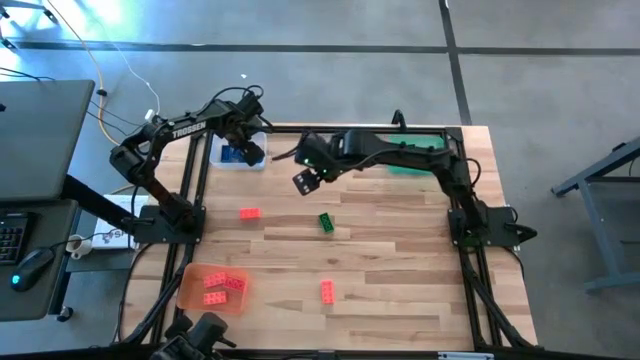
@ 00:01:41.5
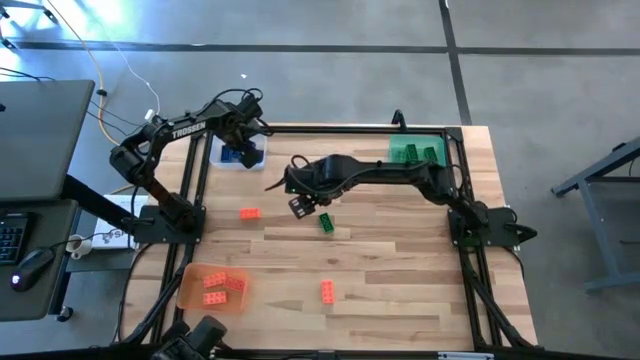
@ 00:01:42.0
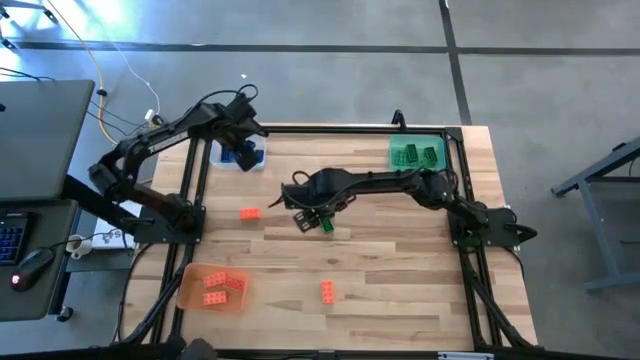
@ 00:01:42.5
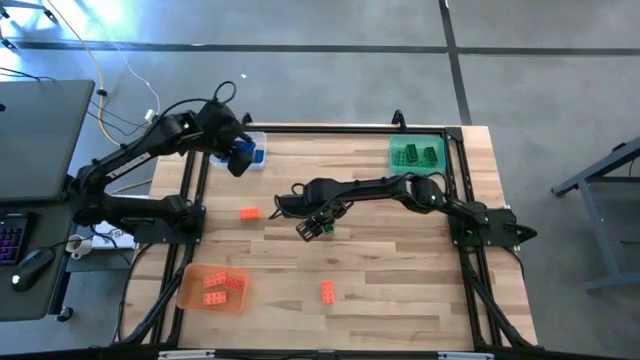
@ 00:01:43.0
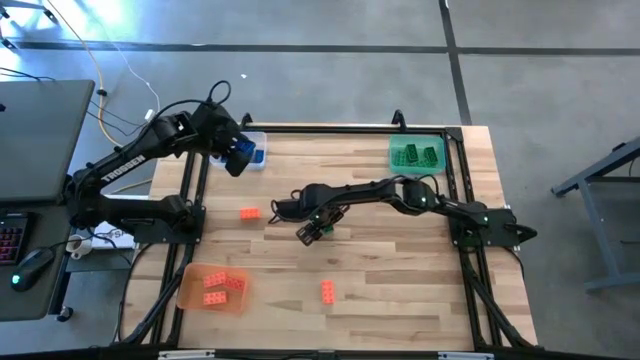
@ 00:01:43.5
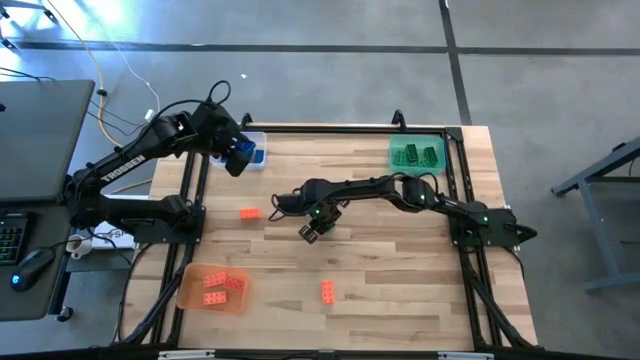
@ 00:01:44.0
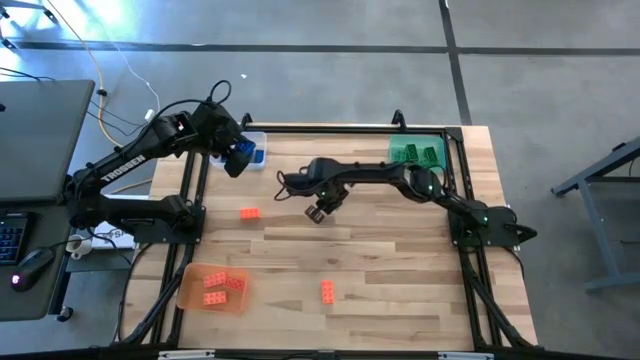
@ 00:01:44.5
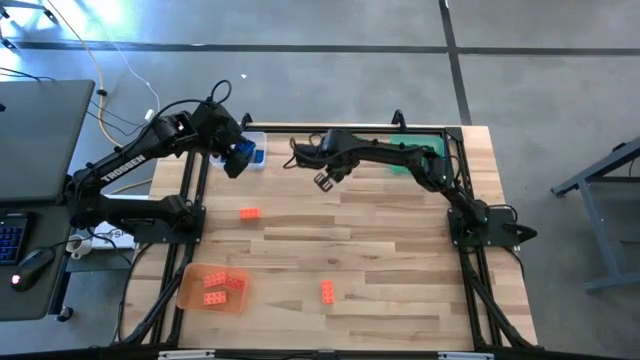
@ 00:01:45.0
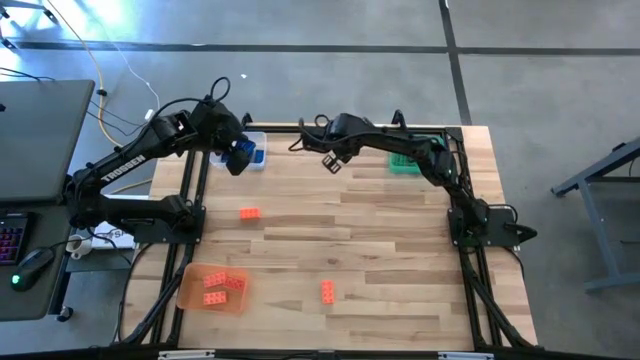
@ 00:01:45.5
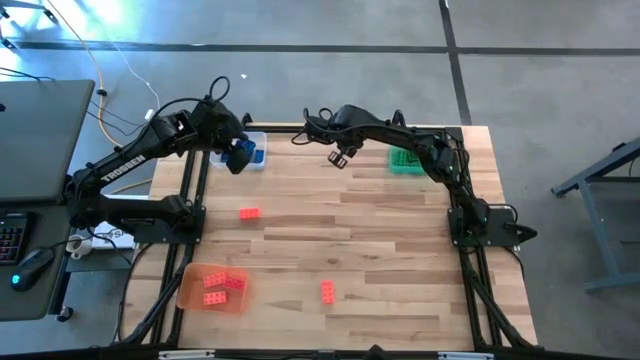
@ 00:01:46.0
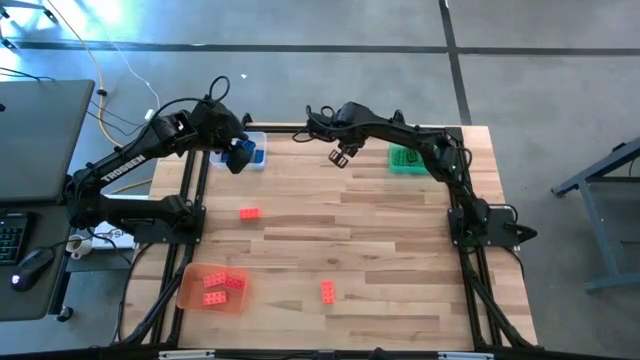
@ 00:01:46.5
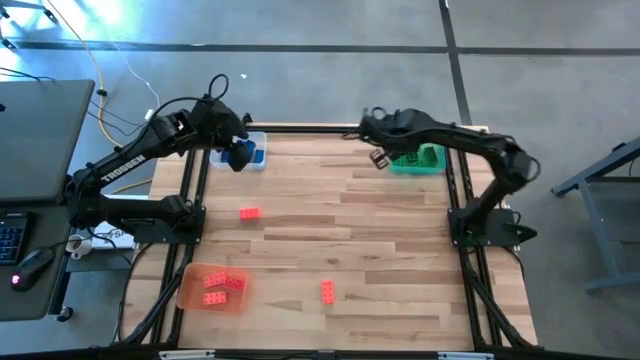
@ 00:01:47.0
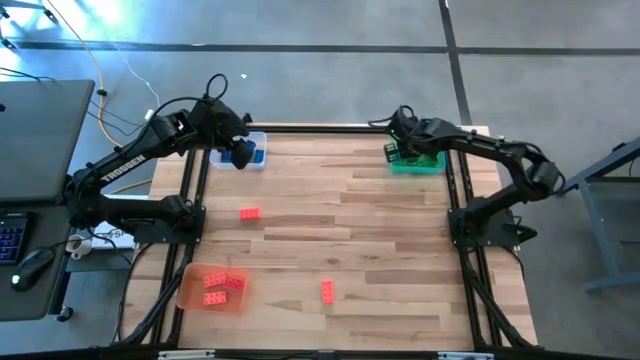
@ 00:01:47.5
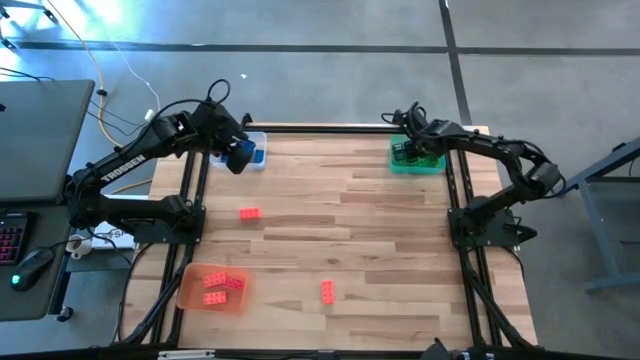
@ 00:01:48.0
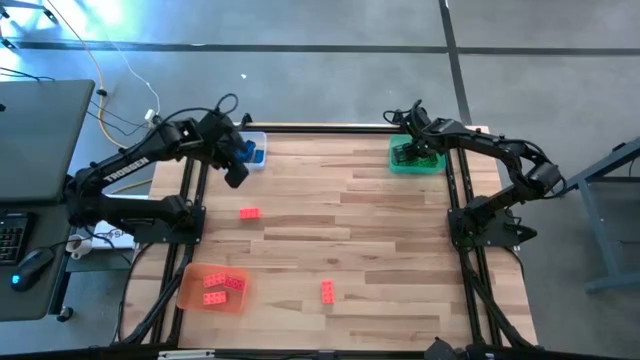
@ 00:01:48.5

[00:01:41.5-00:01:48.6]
Task: Sort & place blocks by color
Put the green game piece into the green bin

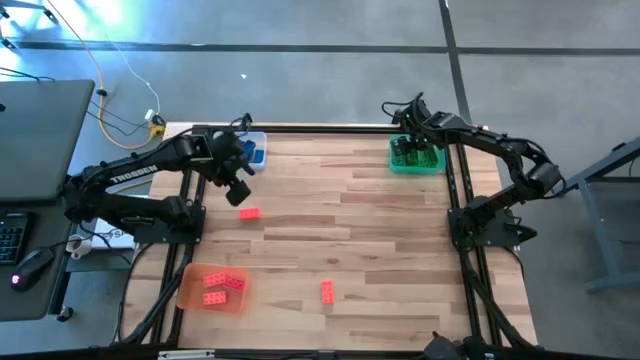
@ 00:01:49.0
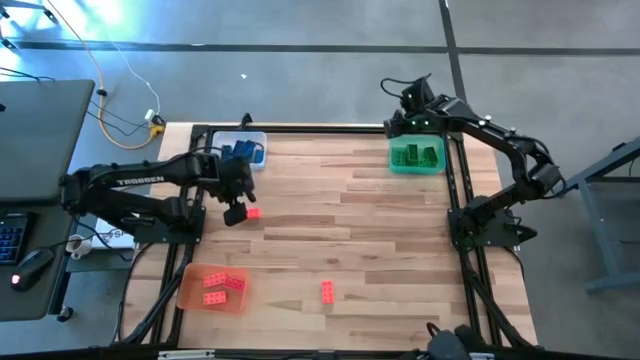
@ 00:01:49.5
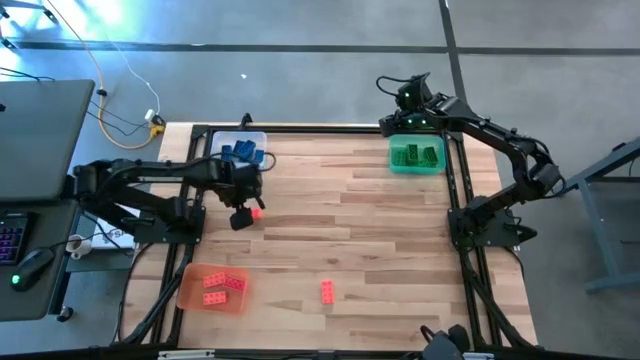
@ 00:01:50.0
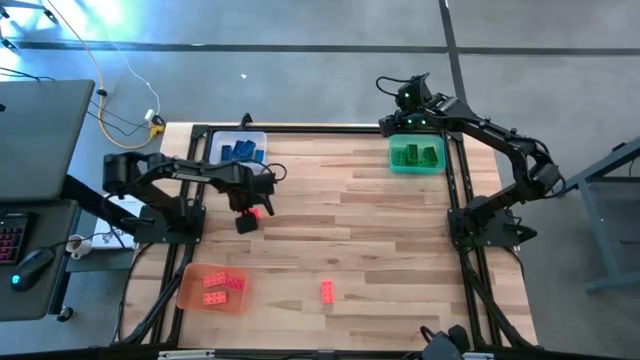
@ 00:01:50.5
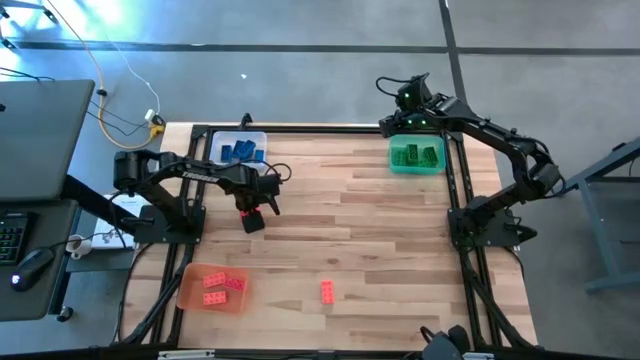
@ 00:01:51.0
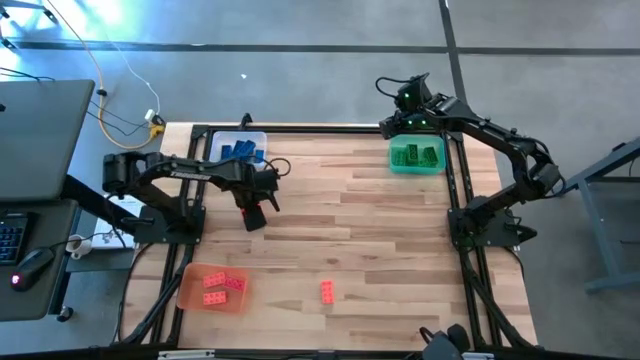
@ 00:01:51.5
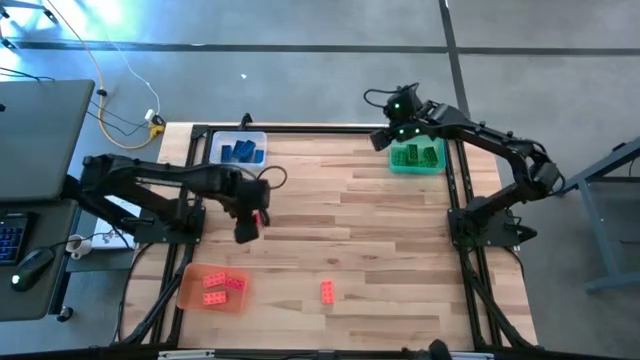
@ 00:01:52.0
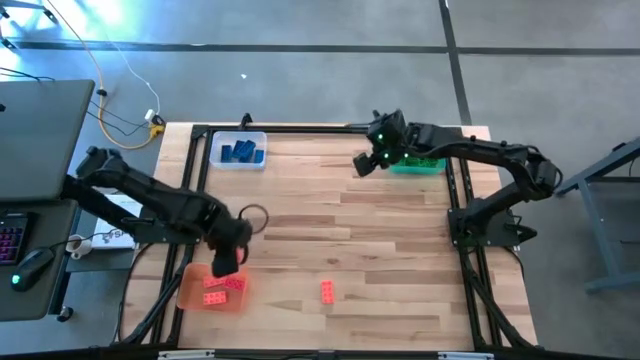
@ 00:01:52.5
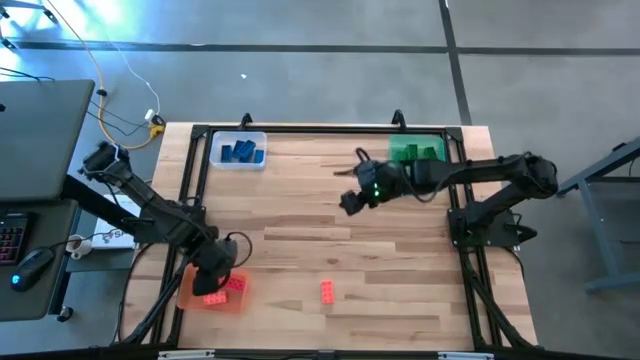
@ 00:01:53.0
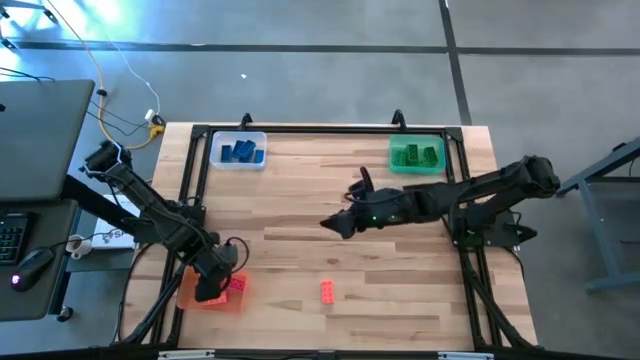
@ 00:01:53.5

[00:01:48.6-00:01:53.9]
Put the orange game piece into the orange bin

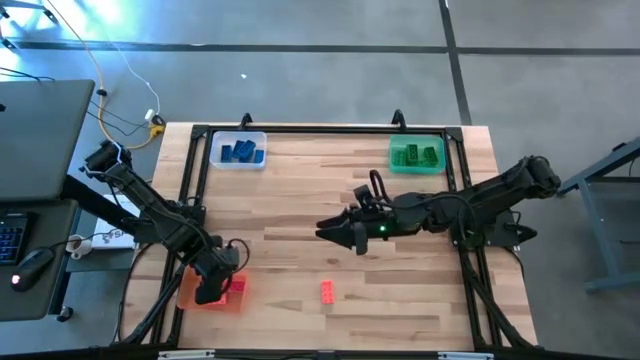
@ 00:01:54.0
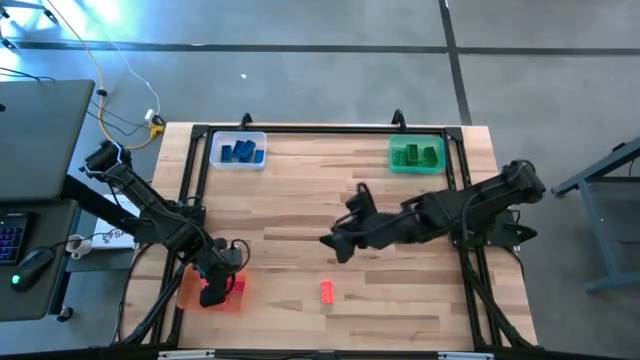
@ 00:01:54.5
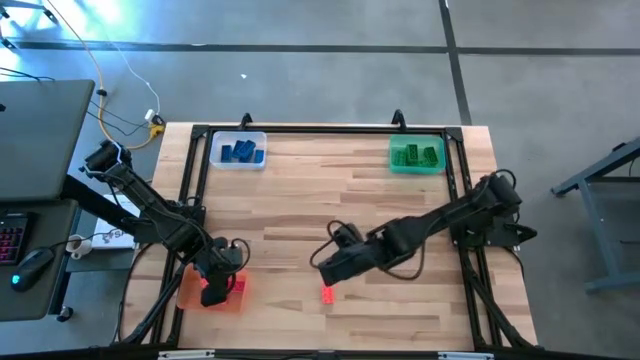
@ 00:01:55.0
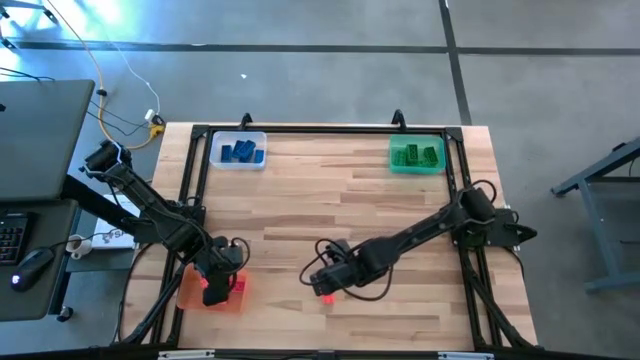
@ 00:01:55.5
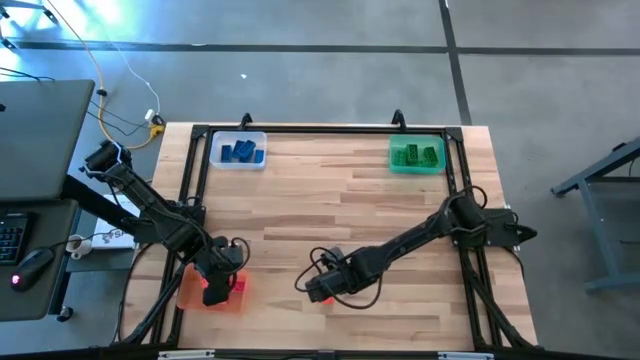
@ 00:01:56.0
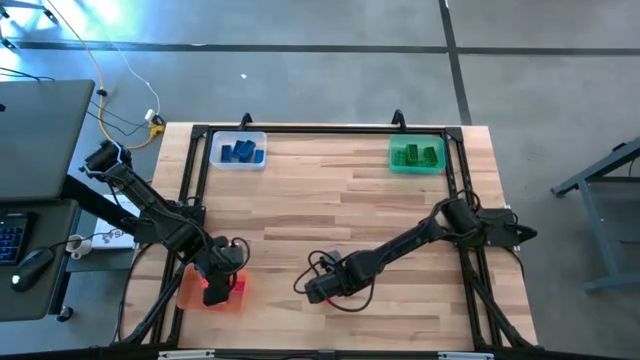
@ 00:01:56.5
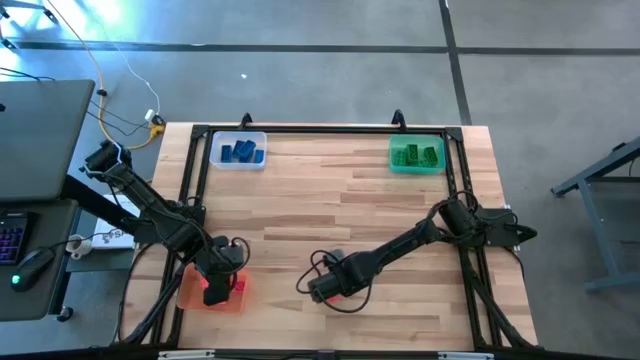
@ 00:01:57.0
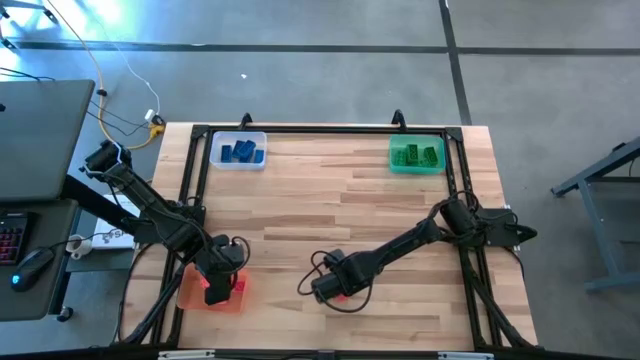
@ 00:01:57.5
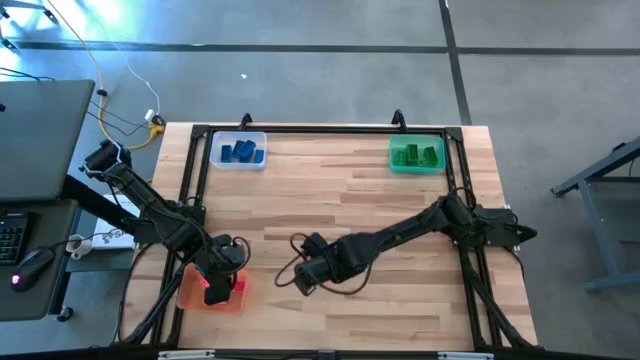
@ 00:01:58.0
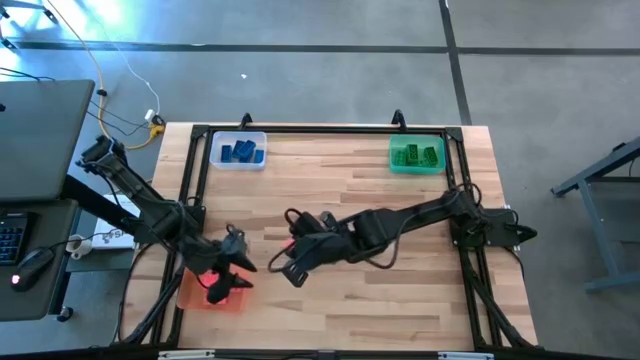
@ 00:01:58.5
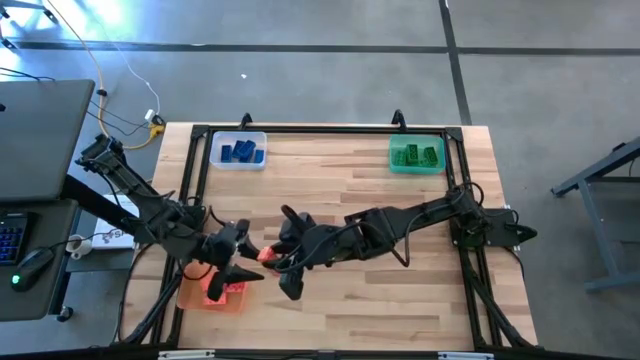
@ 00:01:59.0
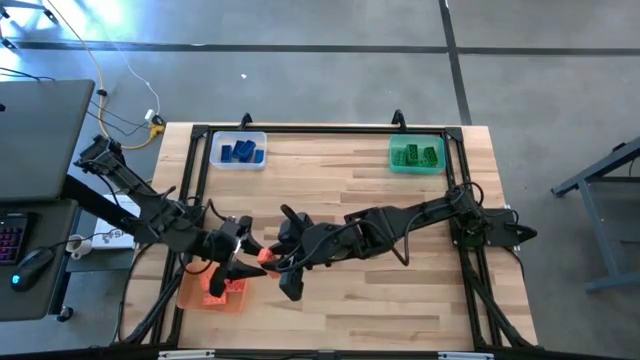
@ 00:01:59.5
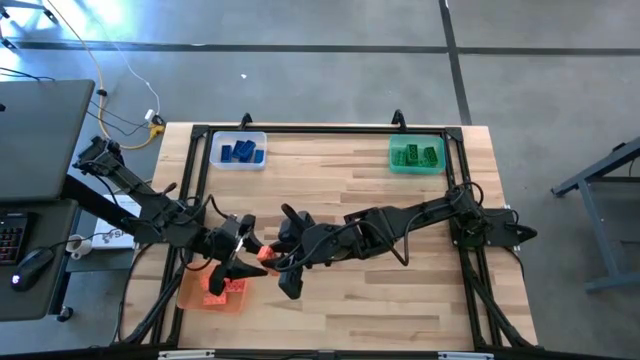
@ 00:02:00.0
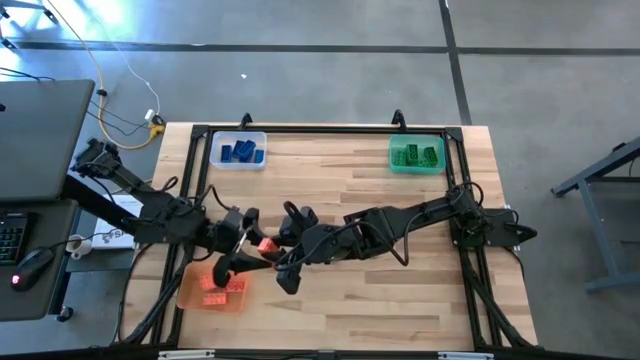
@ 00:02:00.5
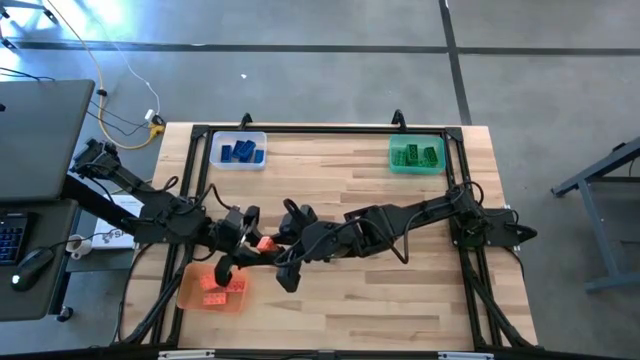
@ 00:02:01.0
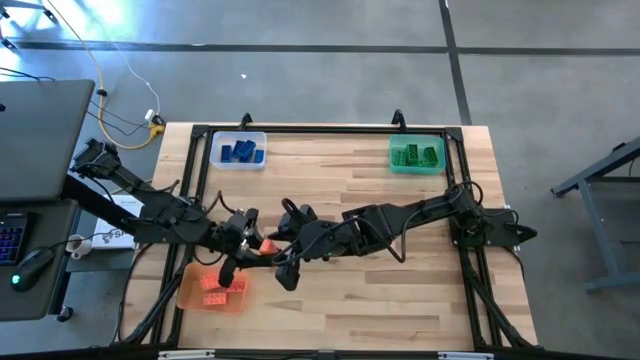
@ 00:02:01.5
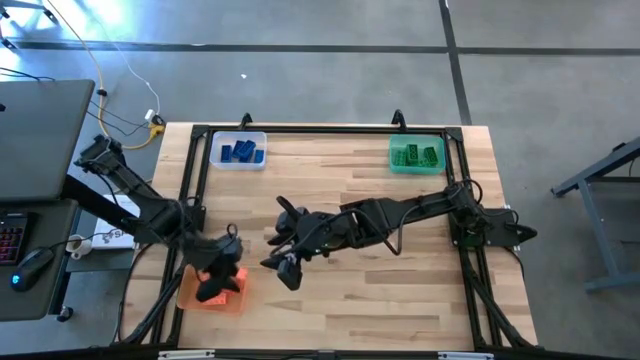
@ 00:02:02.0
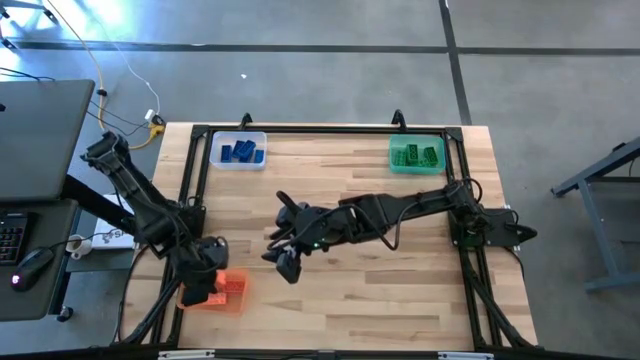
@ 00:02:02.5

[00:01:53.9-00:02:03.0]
Put the orange game piece into the orange bin
